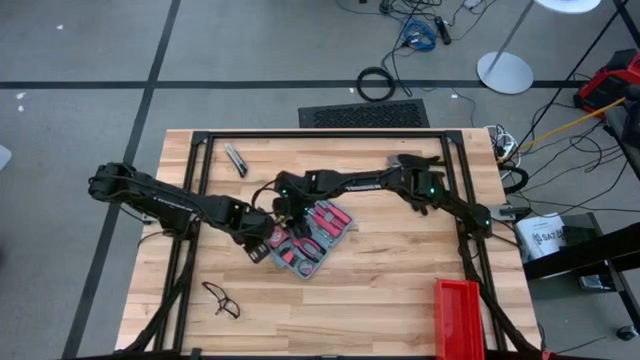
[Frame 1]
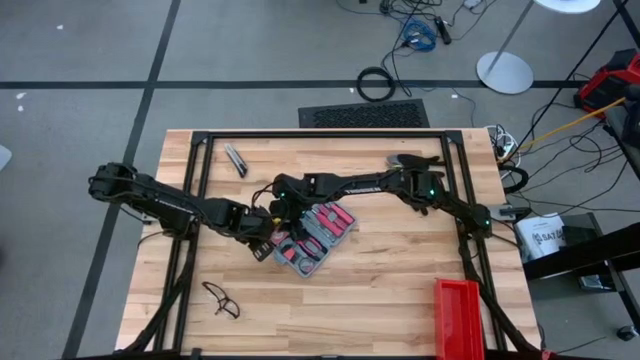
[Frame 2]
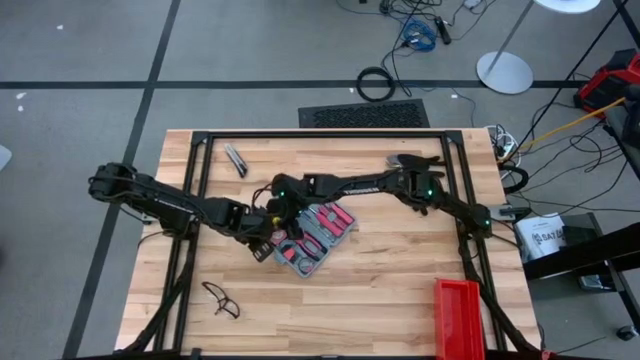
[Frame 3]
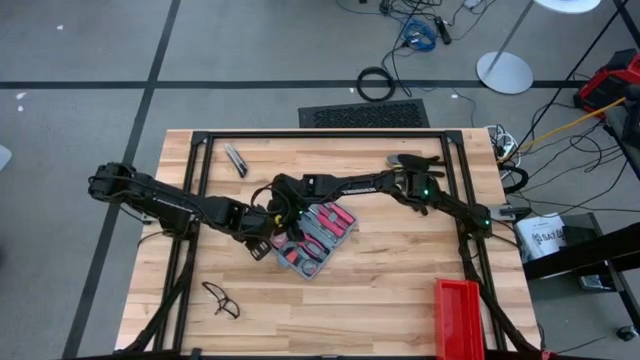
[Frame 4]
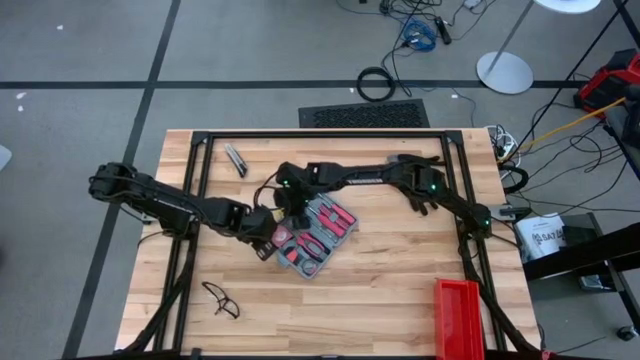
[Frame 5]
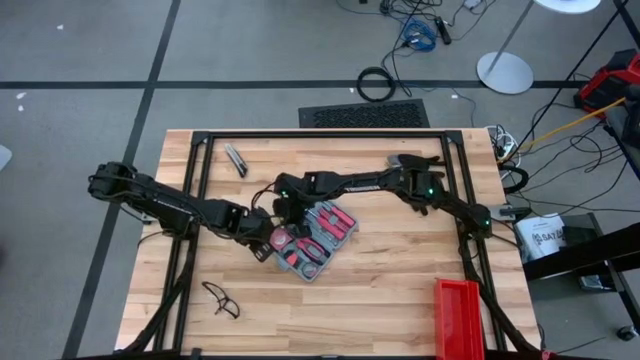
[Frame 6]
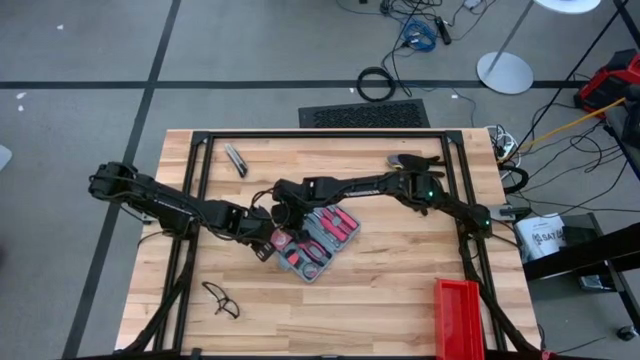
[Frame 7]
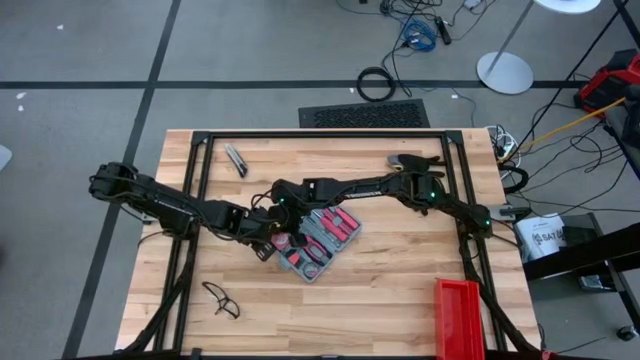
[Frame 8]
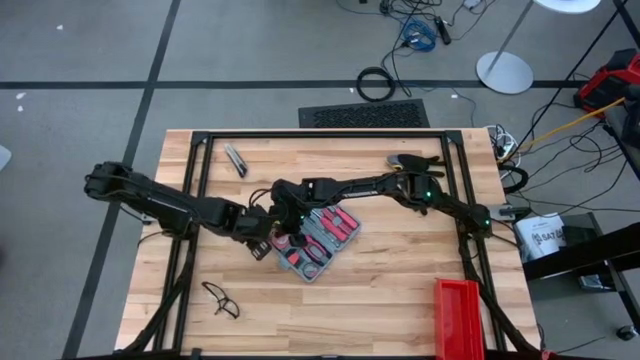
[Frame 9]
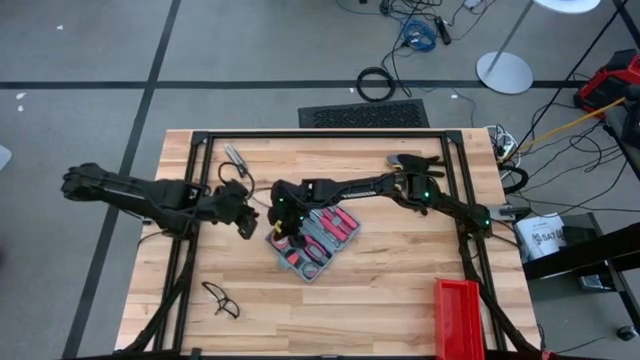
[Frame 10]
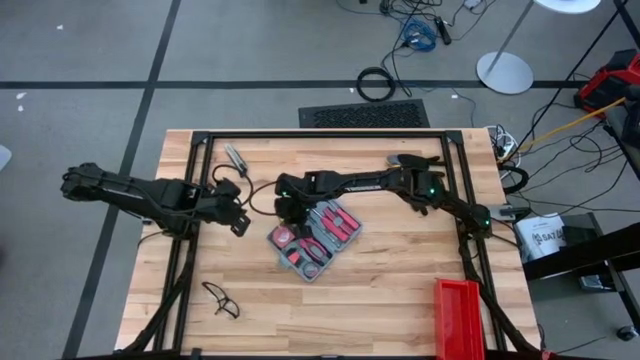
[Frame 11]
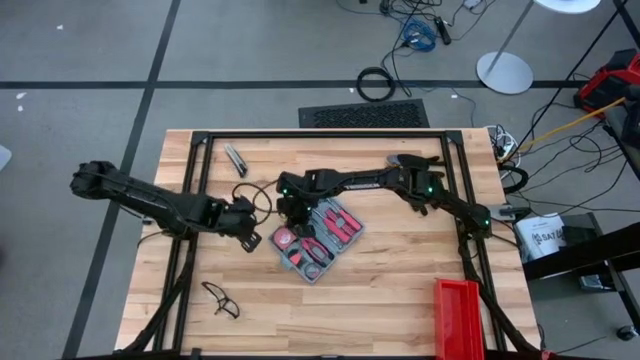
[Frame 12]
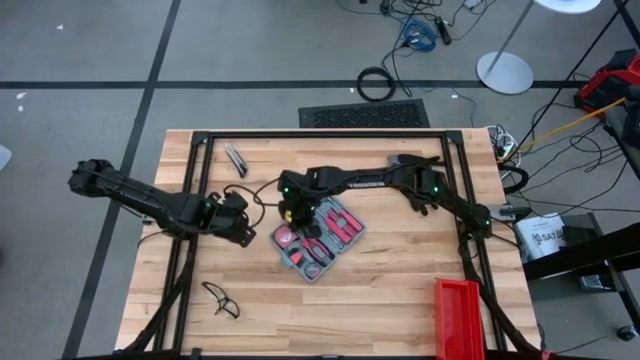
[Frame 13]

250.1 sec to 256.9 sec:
Task: prefit tool cases
Adjust the pink tape measure

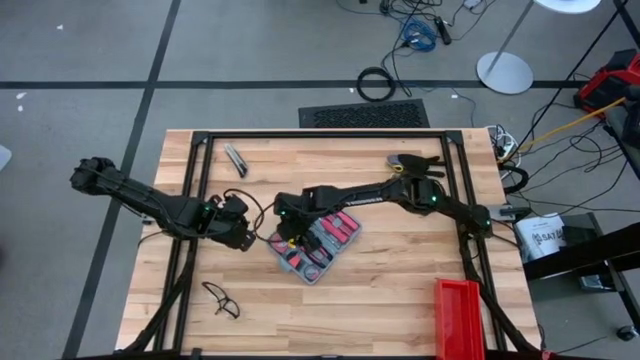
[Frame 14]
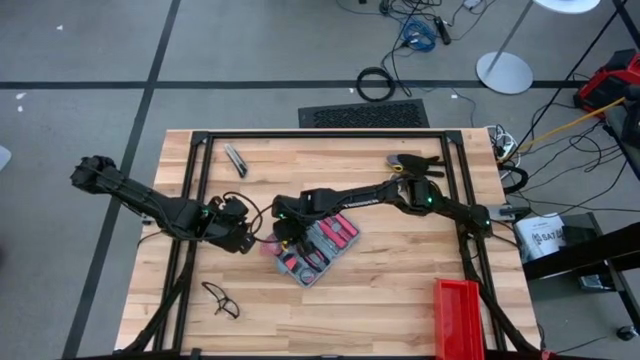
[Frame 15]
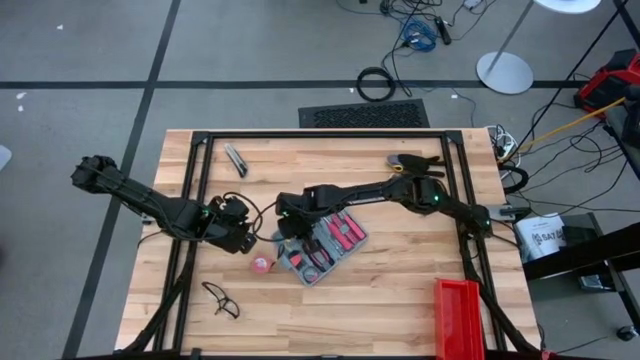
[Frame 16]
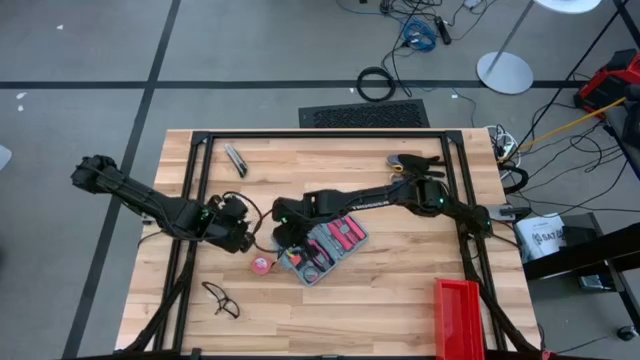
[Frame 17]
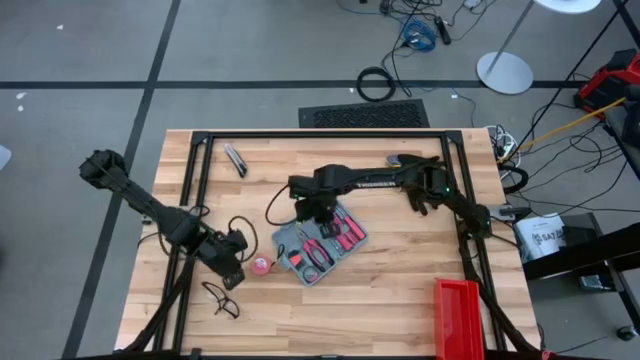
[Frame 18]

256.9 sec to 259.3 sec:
Adjust the pink tape measure

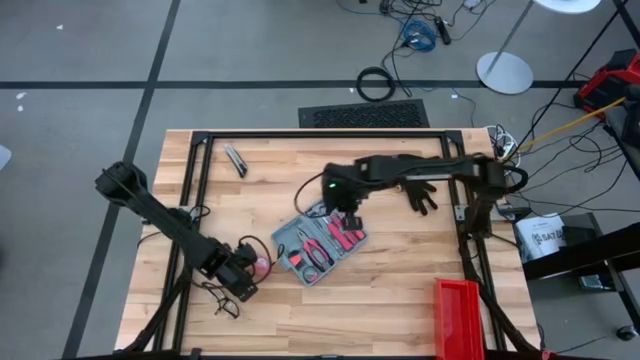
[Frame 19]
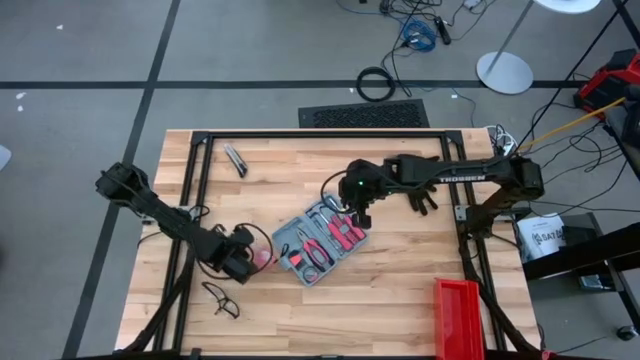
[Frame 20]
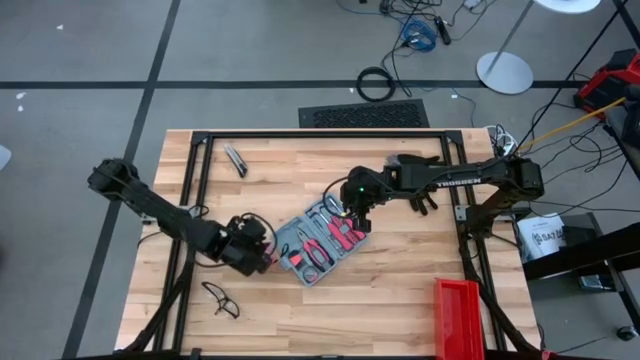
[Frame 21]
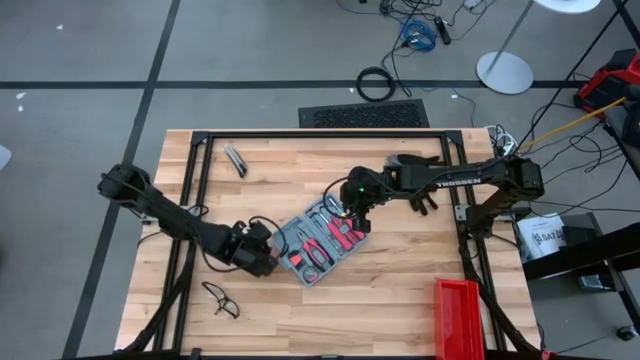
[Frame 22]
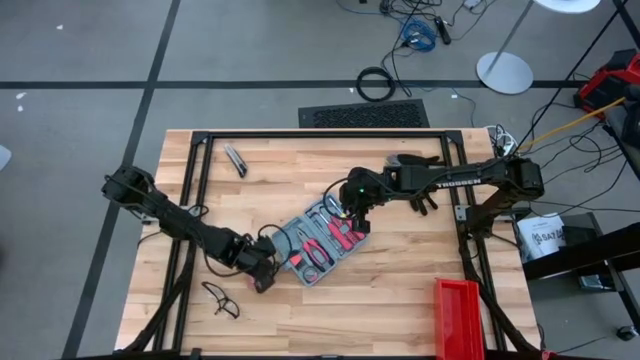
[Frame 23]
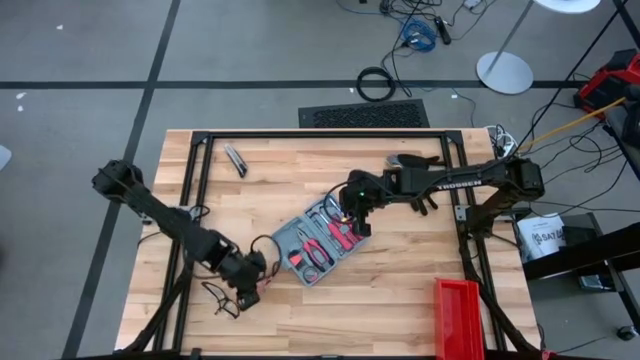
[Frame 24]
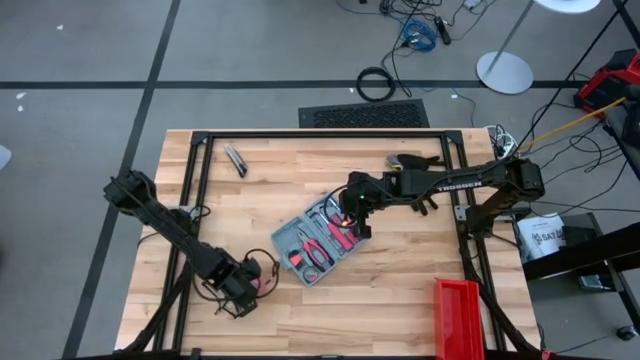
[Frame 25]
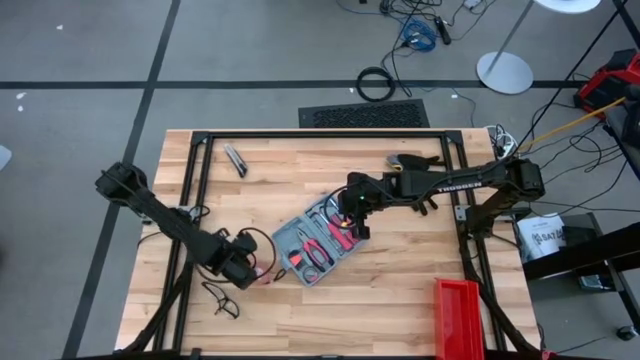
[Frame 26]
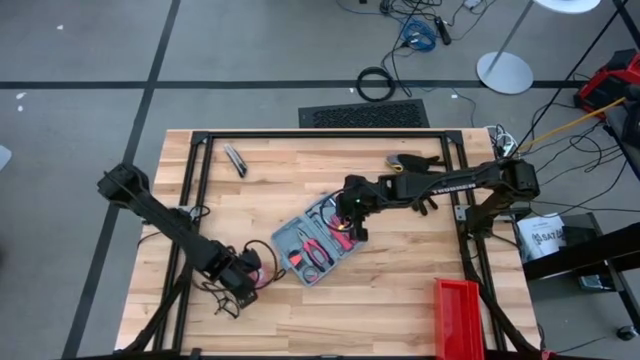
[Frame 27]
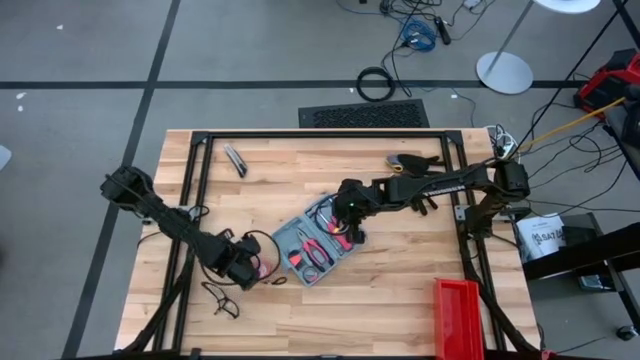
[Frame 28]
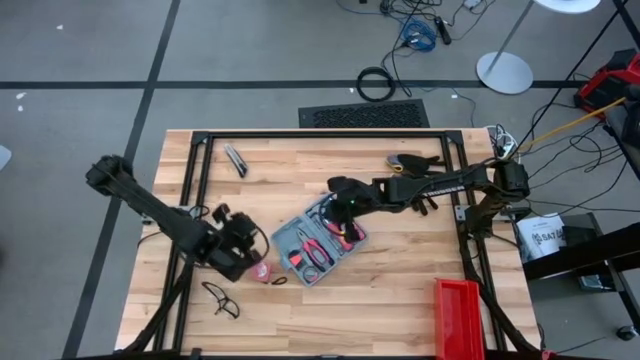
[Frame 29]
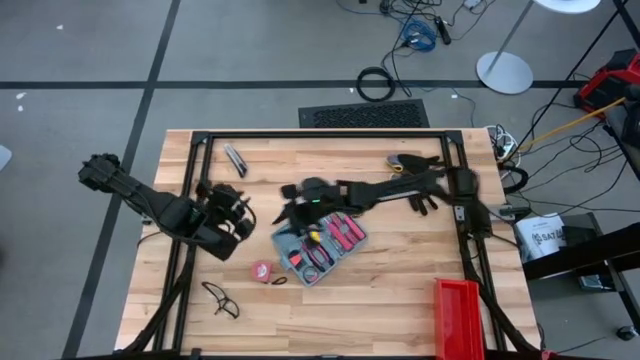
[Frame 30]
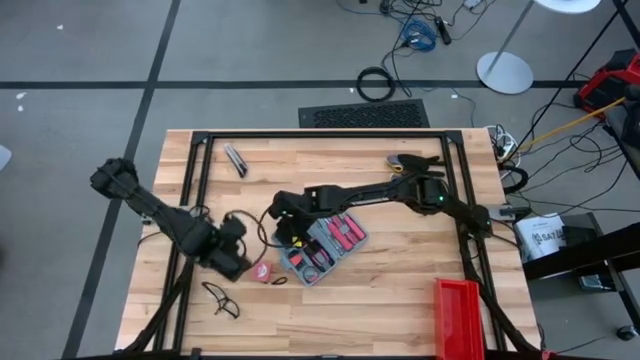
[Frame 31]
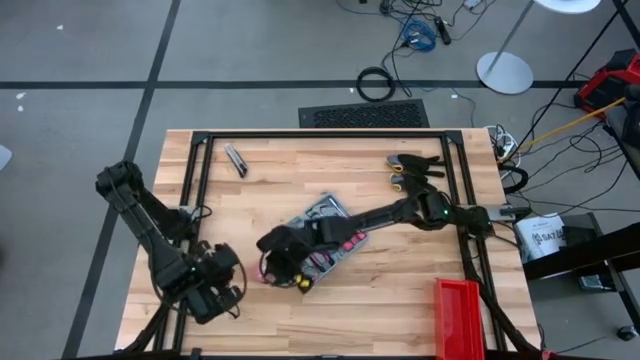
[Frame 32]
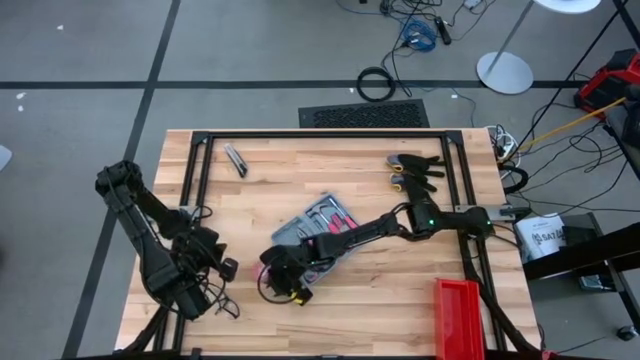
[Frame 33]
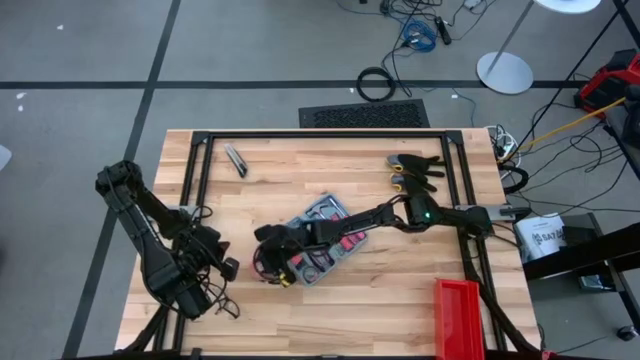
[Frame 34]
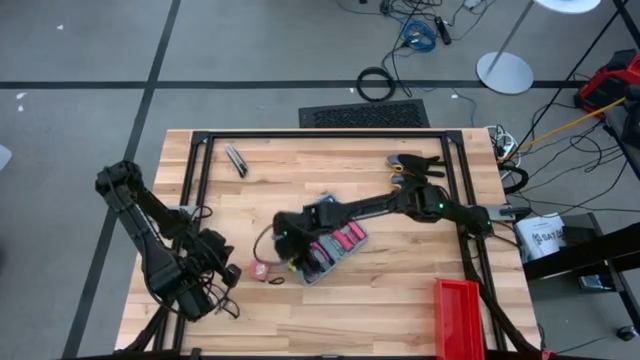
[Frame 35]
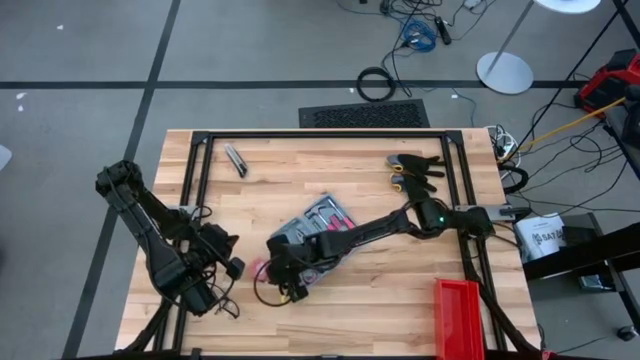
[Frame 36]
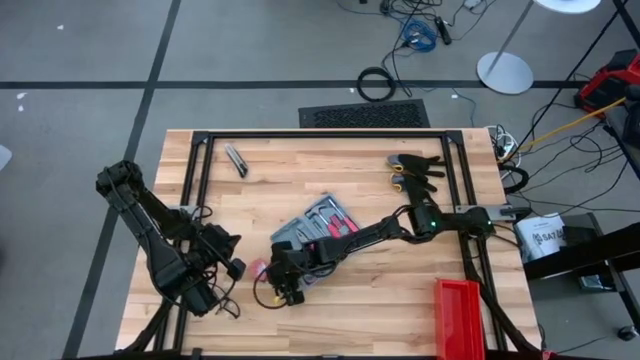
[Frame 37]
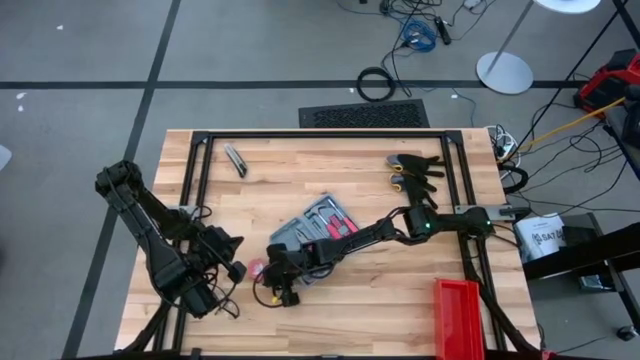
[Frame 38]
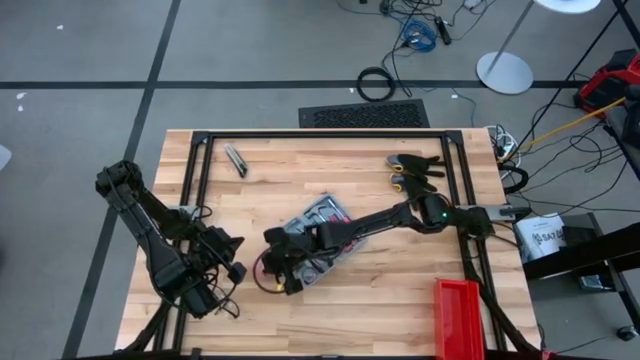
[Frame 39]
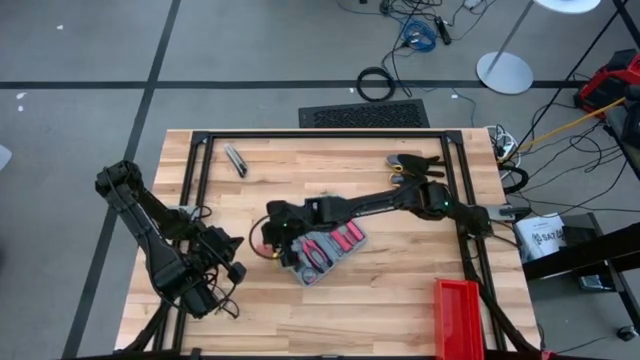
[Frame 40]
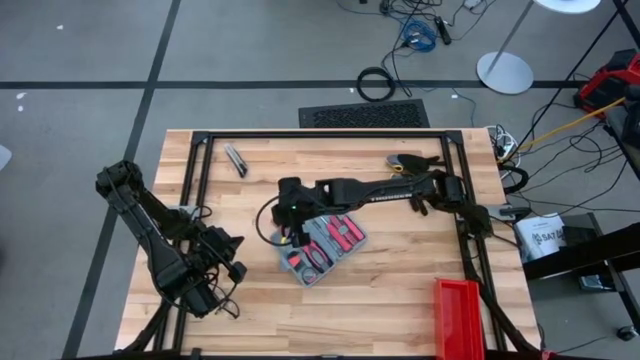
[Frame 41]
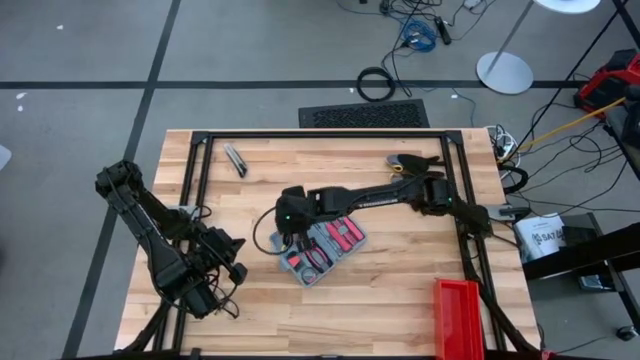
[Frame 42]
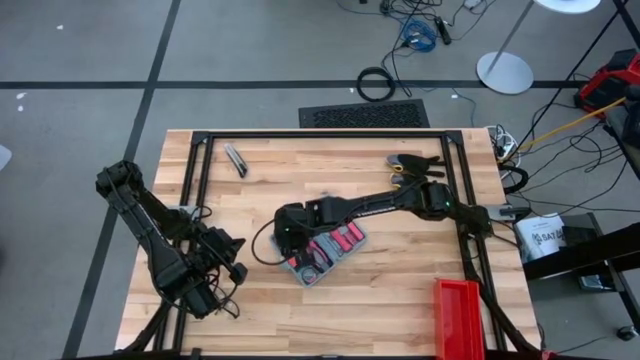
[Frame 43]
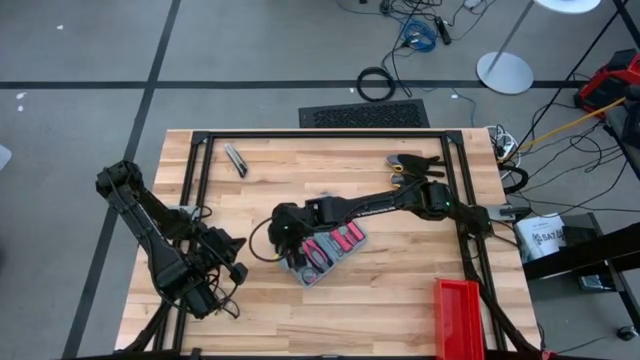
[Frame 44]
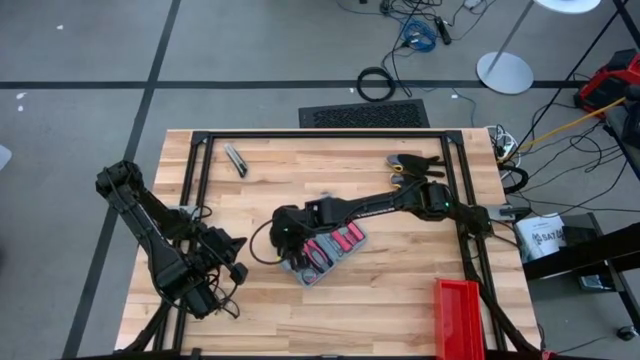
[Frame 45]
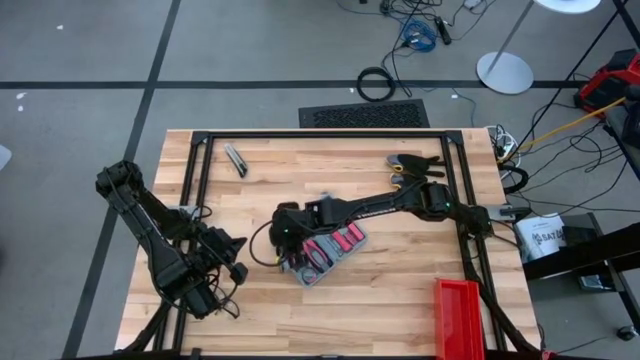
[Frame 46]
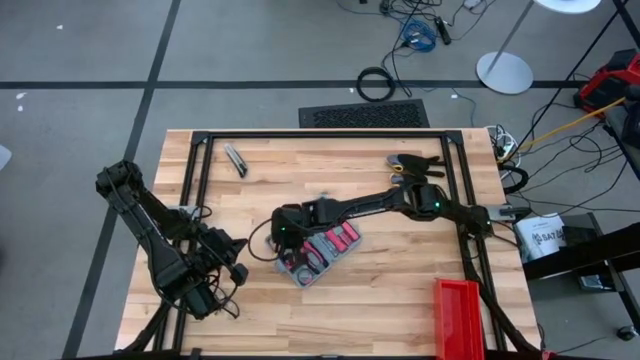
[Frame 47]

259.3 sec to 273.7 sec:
Adjust the pink tape measure
